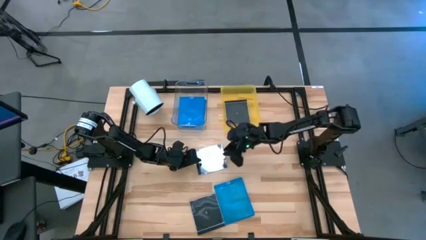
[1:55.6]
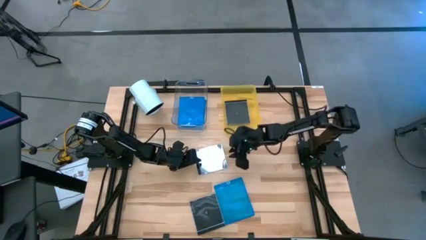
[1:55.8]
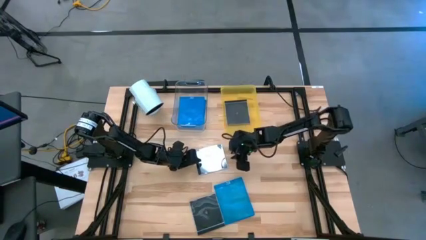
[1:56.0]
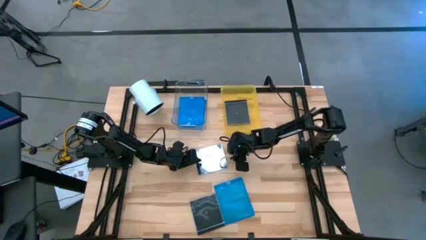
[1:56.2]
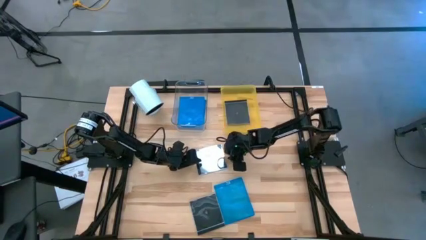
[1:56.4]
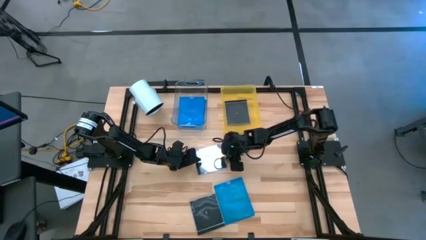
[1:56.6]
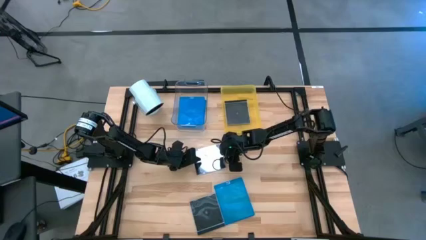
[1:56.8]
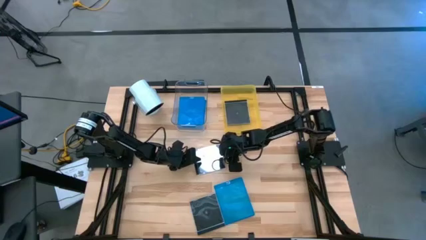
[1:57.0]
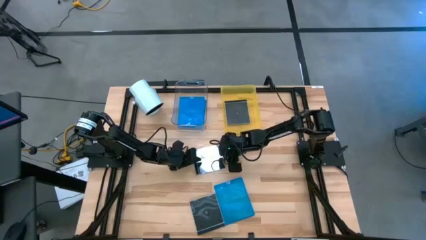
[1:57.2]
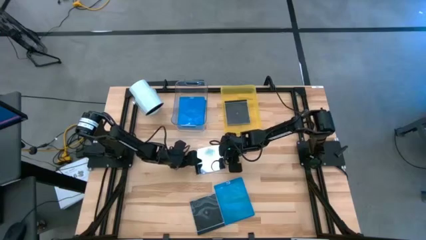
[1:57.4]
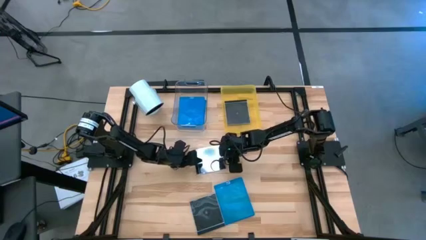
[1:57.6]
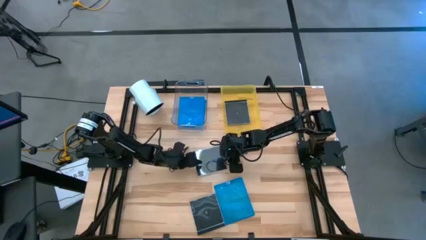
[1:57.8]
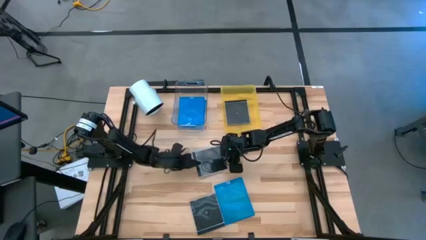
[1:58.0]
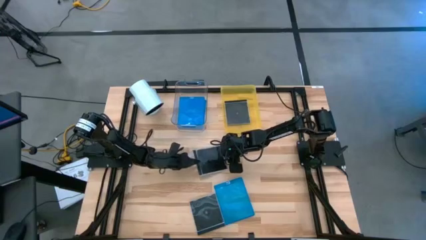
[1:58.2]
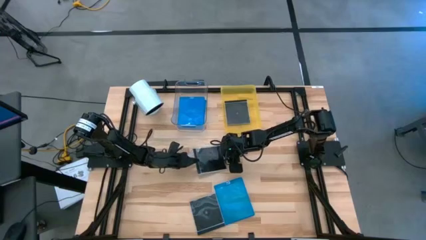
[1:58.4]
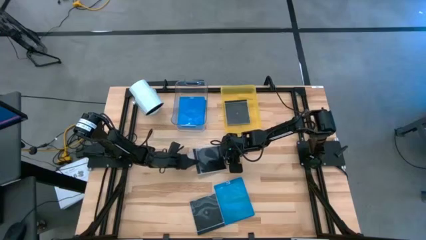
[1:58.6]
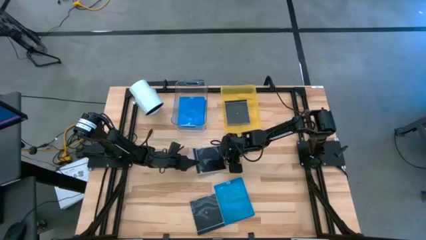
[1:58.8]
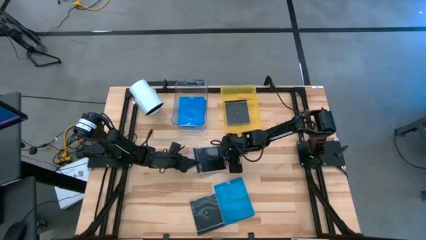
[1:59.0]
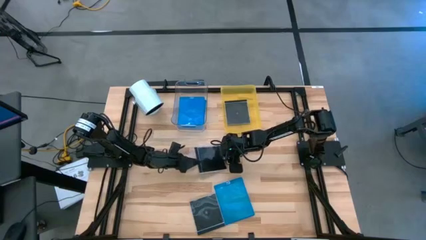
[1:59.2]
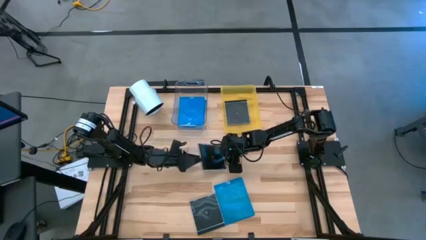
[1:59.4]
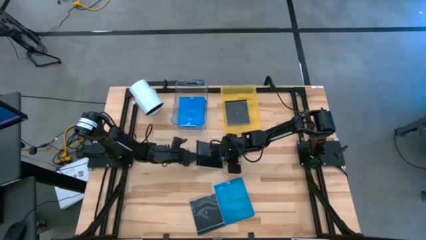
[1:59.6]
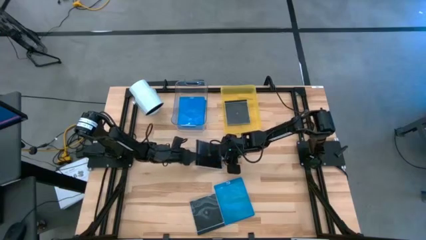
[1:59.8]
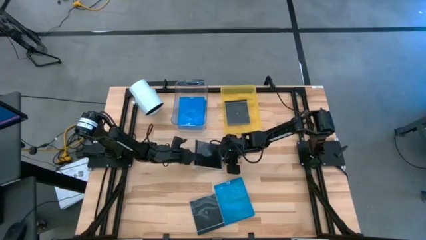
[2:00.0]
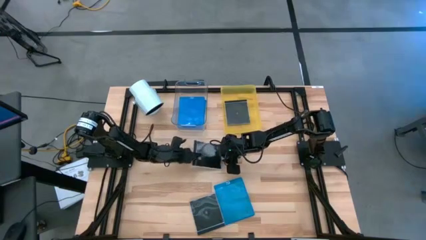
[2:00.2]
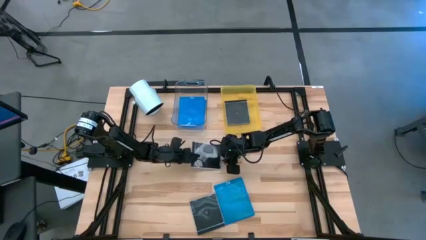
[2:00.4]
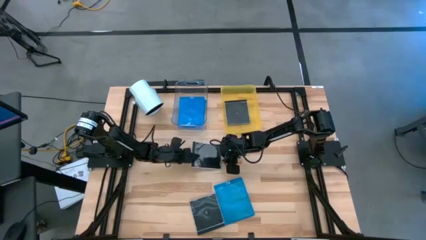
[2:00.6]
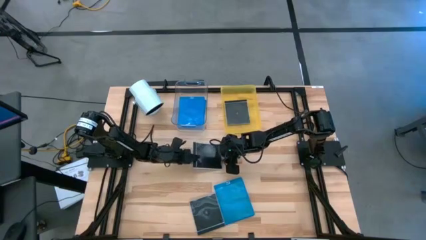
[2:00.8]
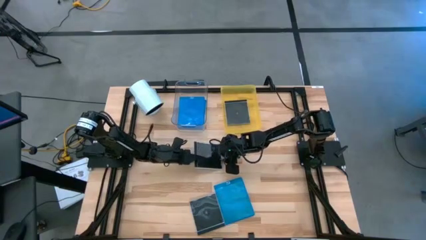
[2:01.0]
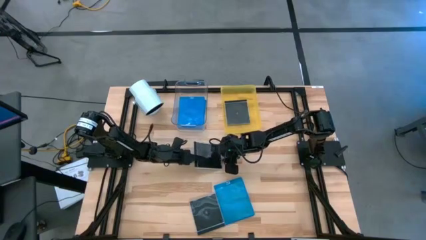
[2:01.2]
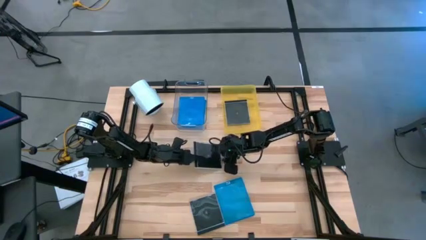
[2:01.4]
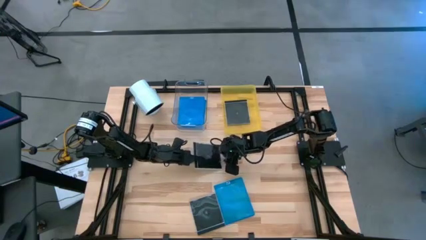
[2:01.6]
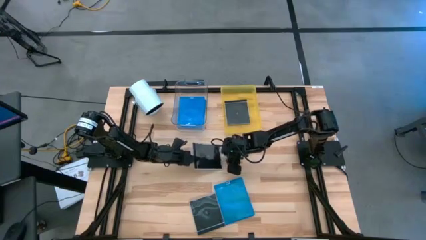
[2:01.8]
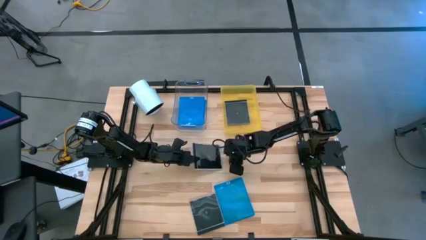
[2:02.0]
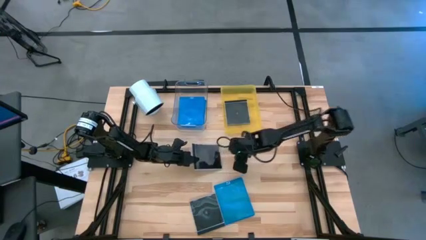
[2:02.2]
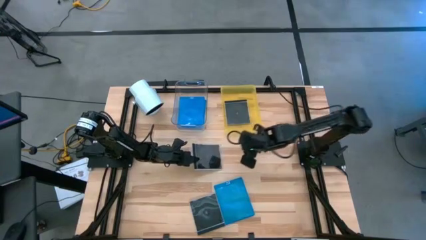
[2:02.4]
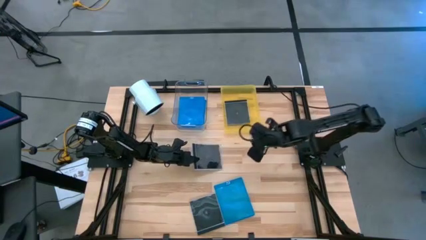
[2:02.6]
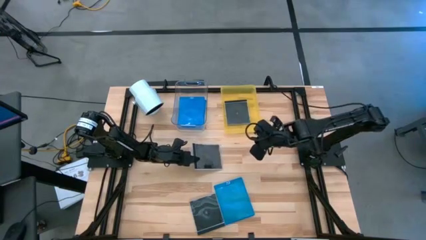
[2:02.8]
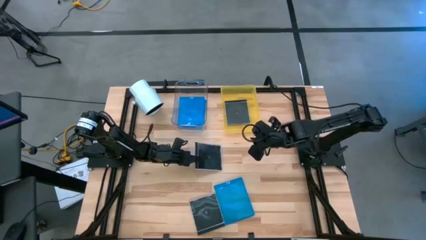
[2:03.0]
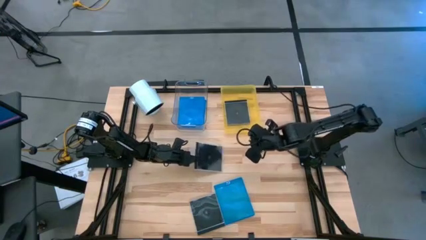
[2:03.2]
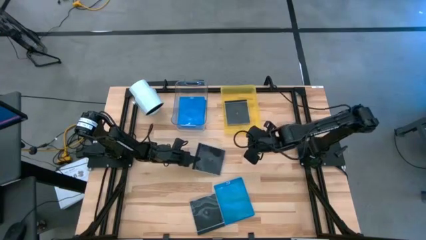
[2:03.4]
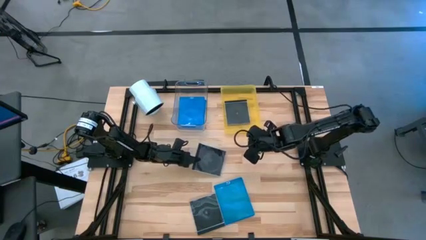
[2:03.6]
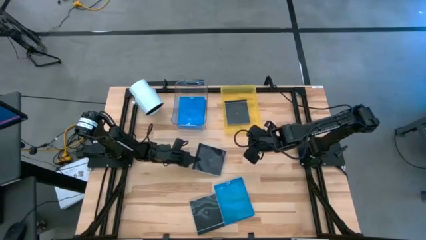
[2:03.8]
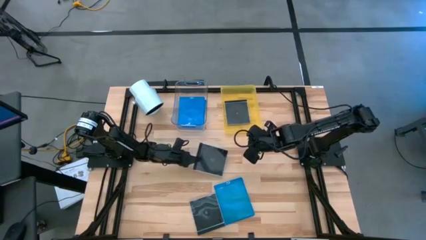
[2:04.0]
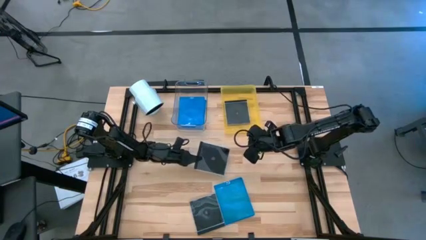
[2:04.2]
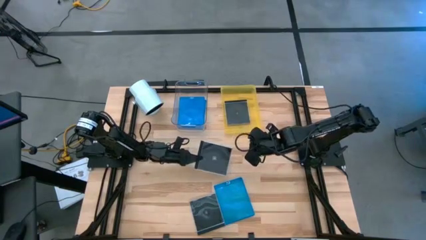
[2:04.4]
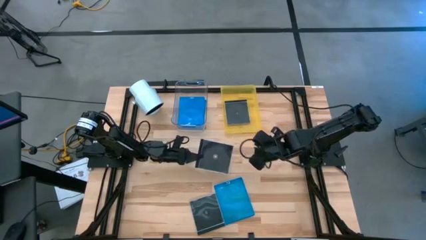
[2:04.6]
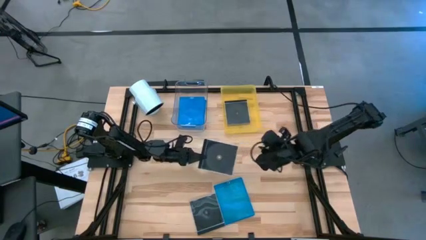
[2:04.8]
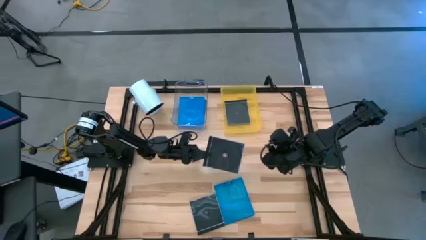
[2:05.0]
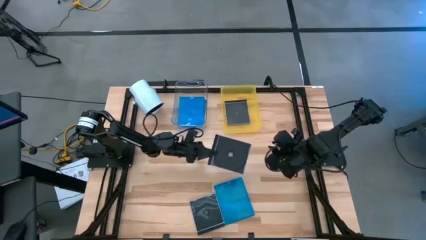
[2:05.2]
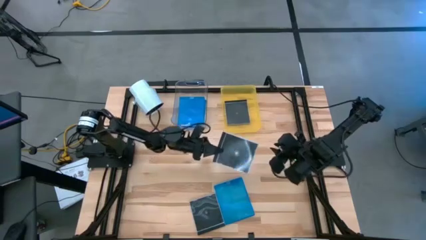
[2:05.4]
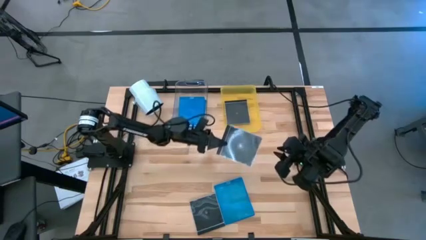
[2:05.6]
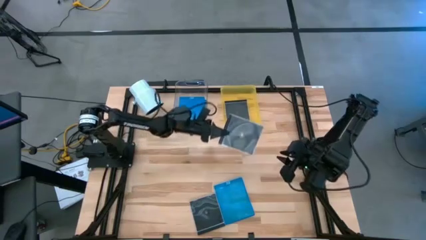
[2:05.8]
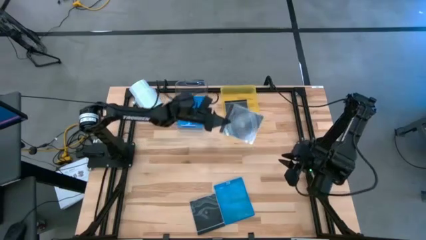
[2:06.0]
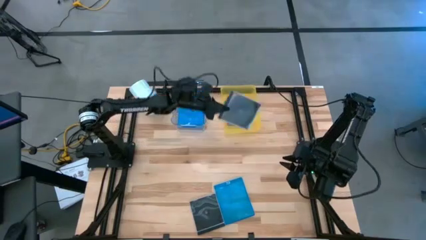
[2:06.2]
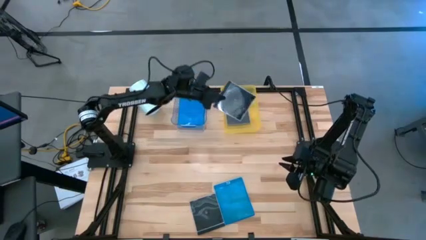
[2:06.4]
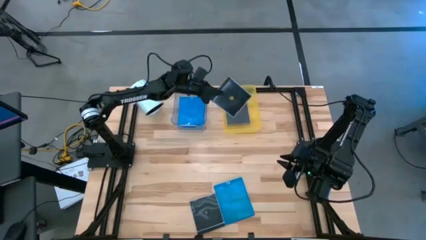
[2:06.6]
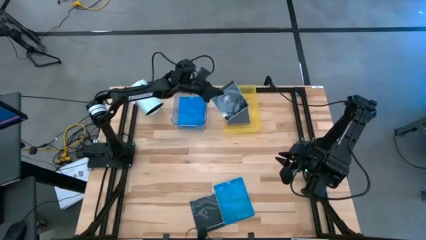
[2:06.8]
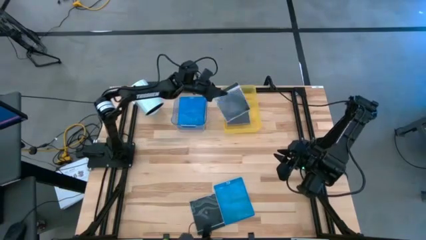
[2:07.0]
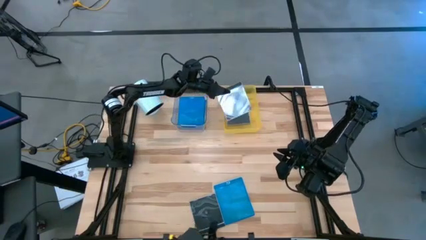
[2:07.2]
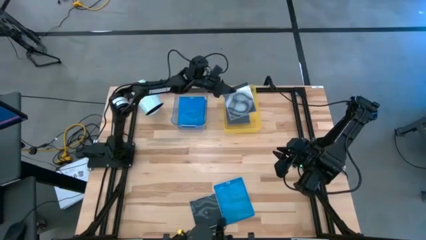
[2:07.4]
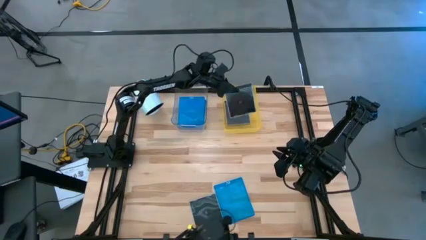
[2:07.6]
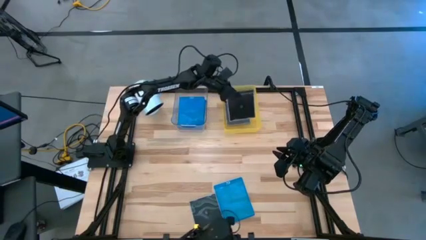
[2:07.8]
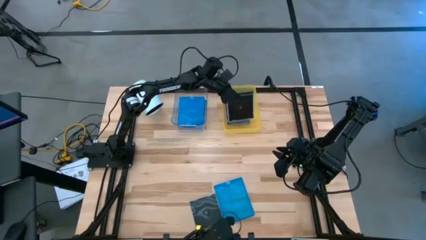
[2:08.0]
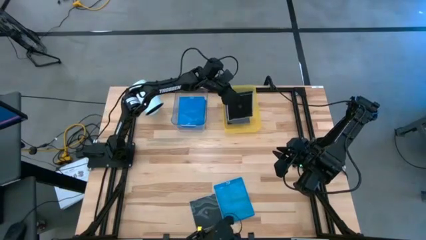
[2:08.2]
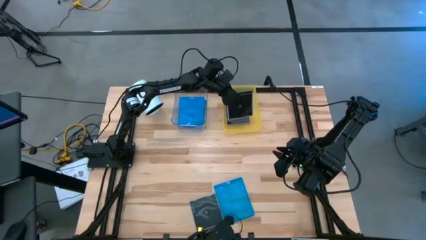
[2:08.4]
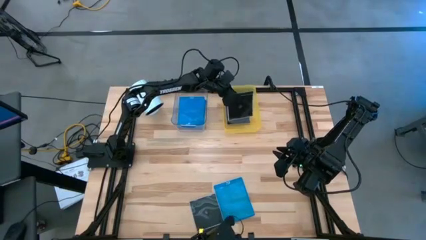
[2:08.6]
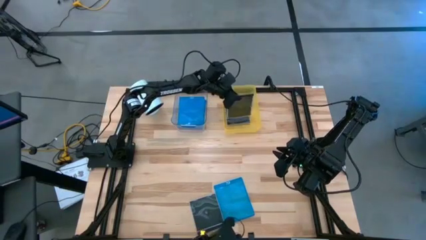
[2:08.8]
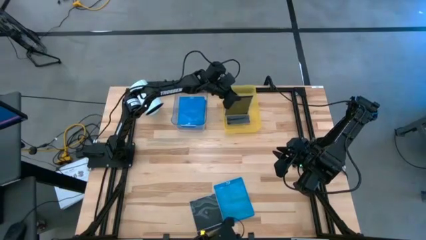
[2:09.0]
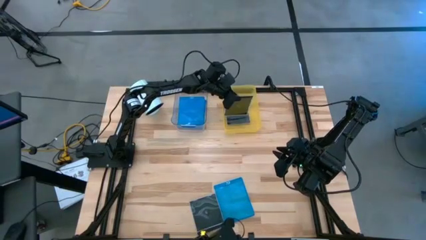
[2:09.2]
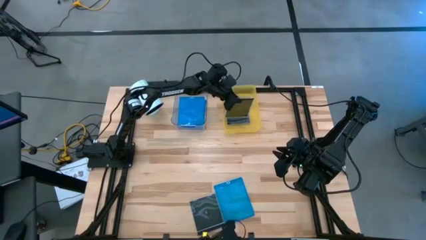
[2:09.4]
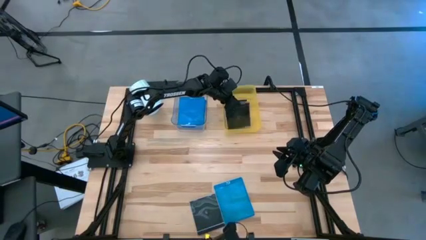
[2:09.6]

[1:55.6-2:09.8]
Task: Pick & place jewel cases by type
Put the left black CD case into the yellow bin
